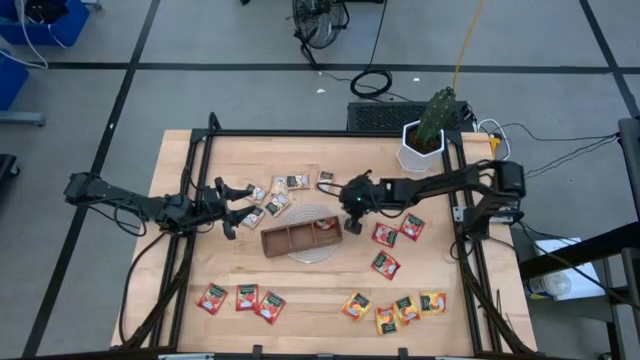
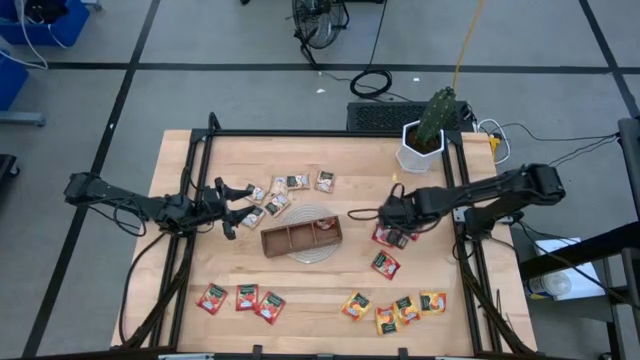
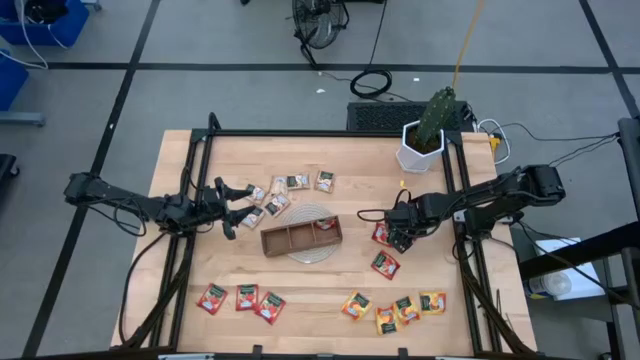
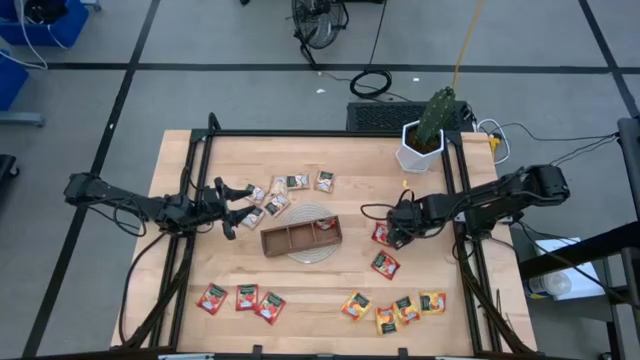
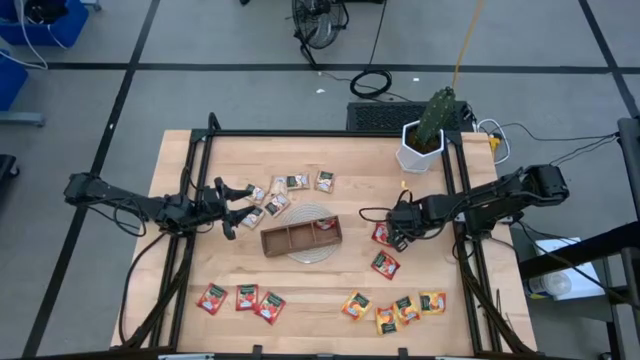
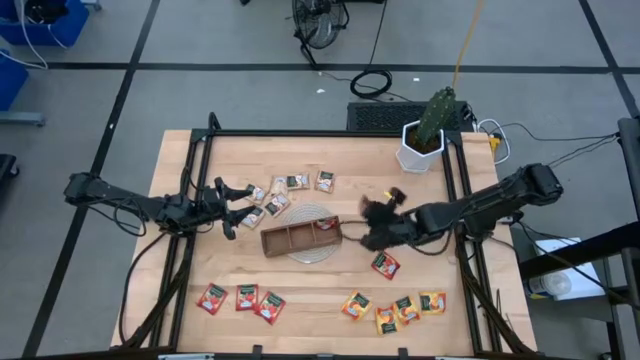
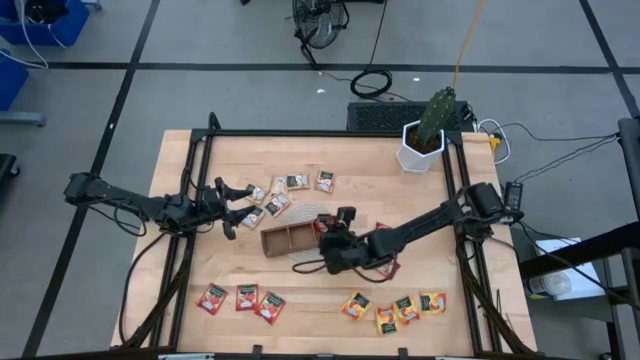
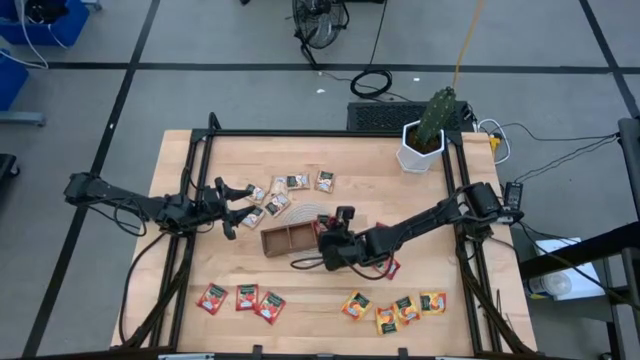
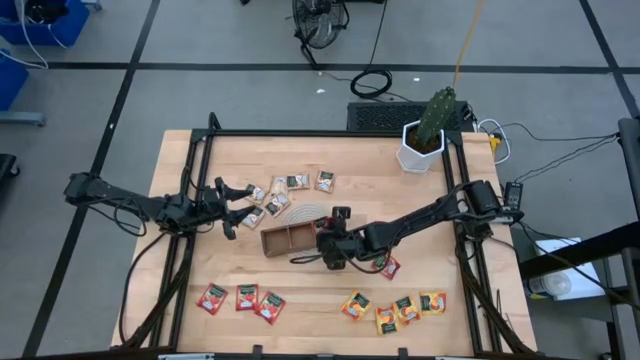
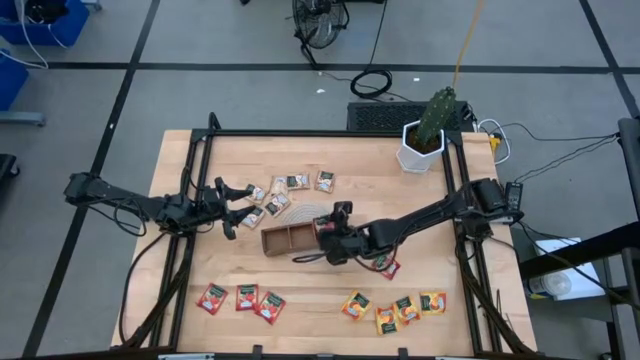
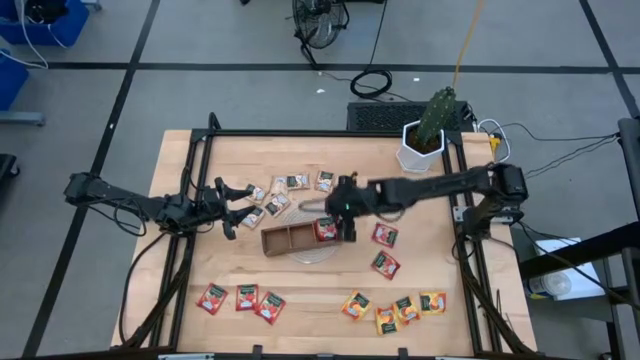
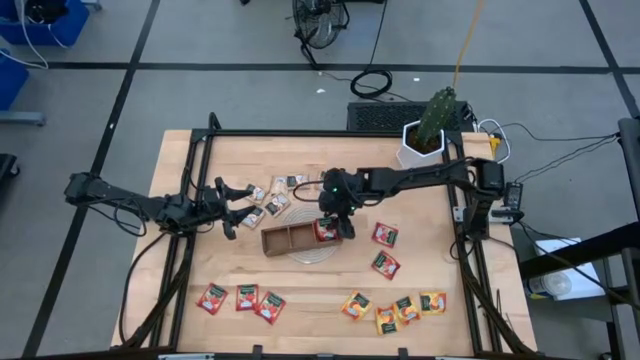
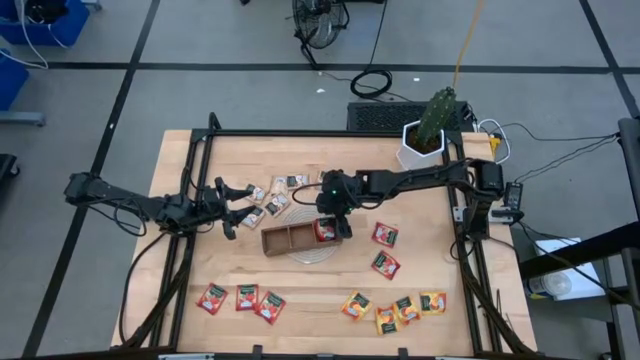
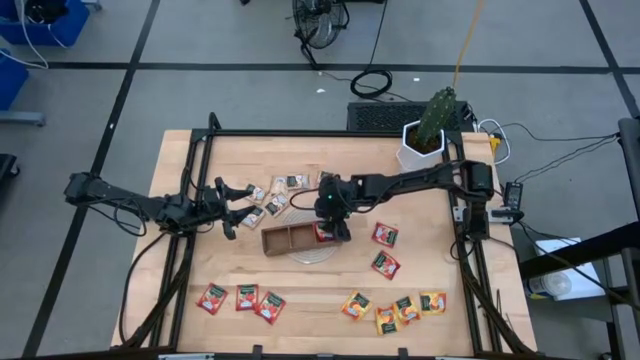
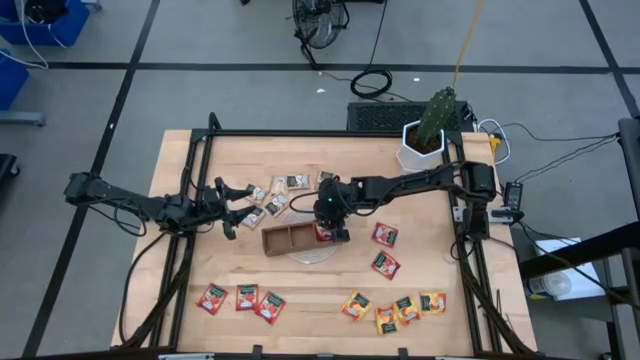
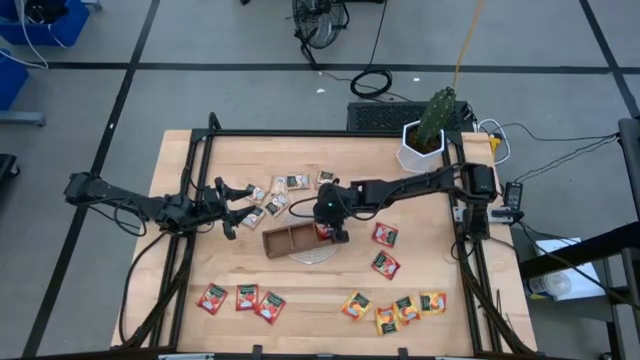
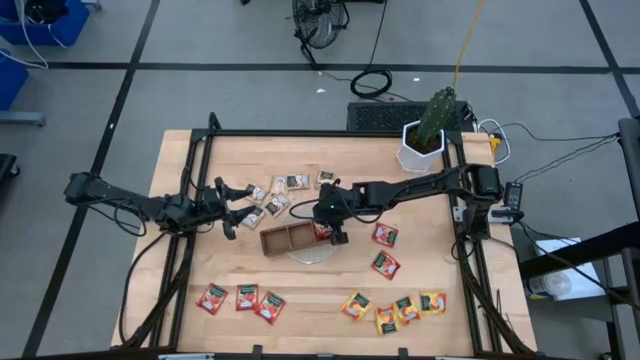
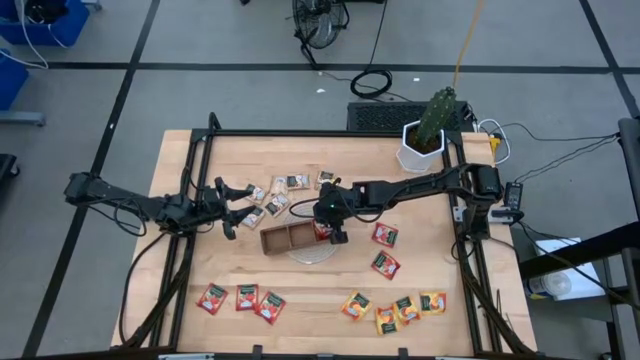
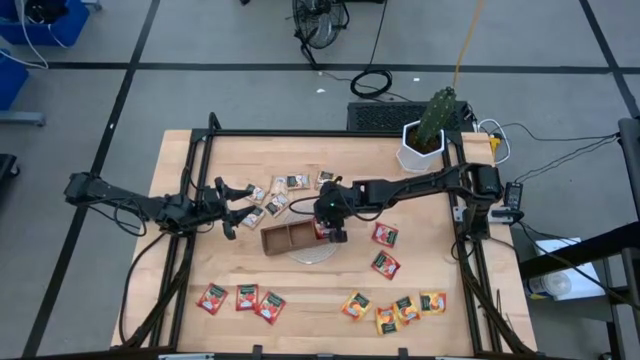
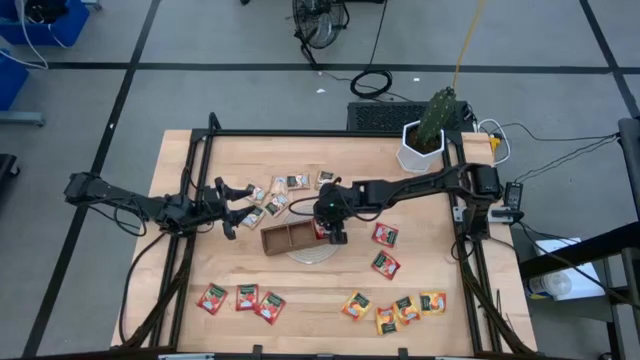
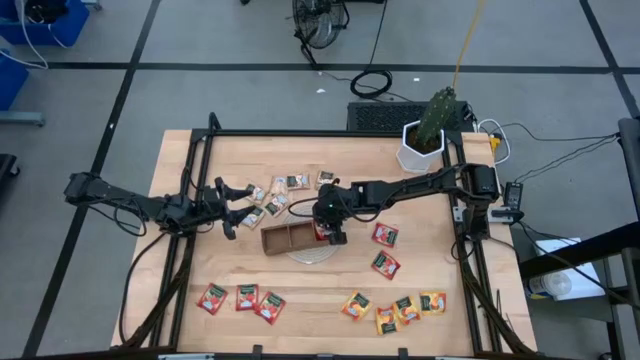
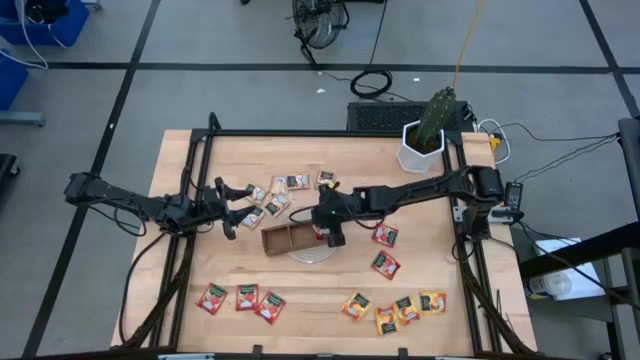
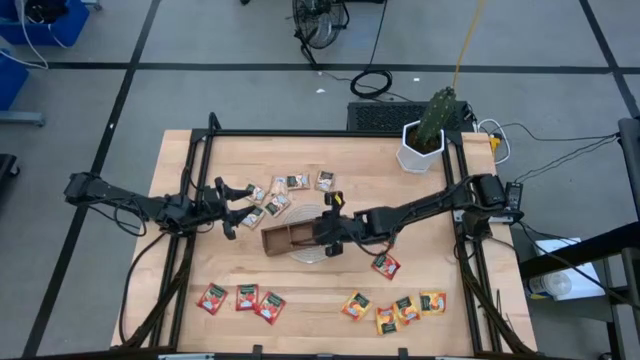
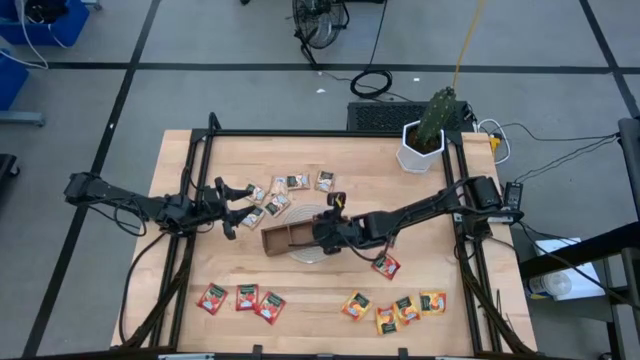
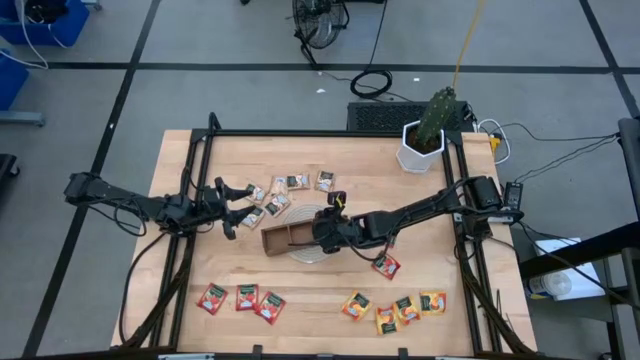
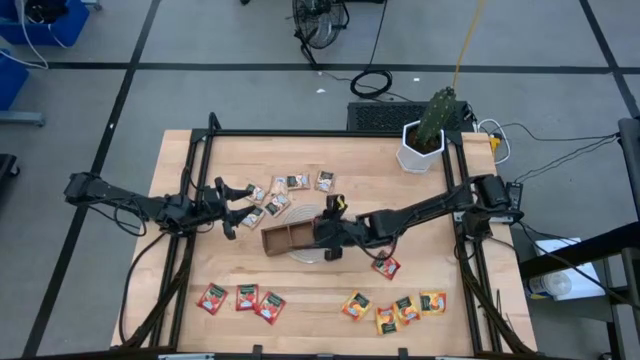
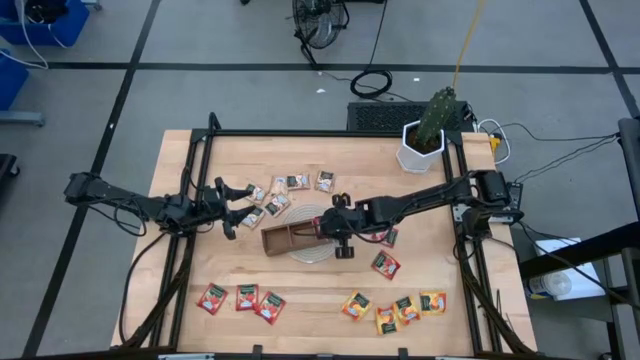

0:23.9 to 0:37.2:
Task: Pick & Place Tea
Put the red tea bag into the right section of the wood organizer

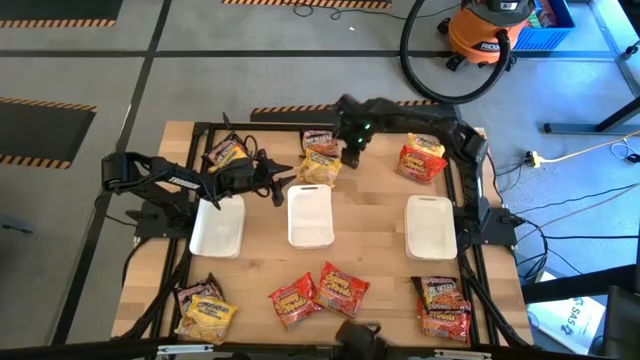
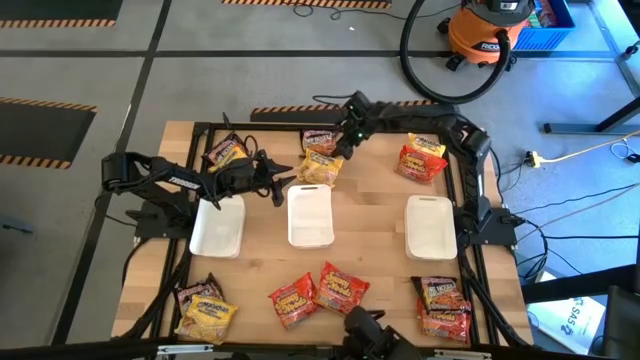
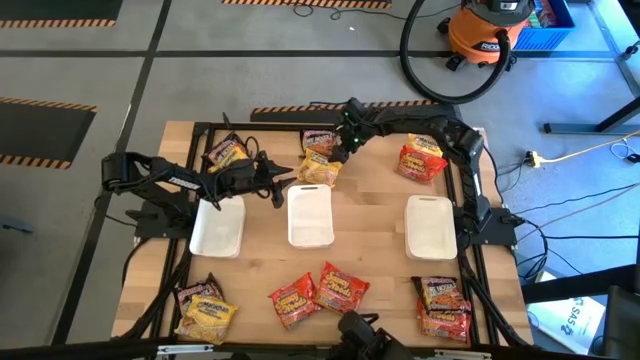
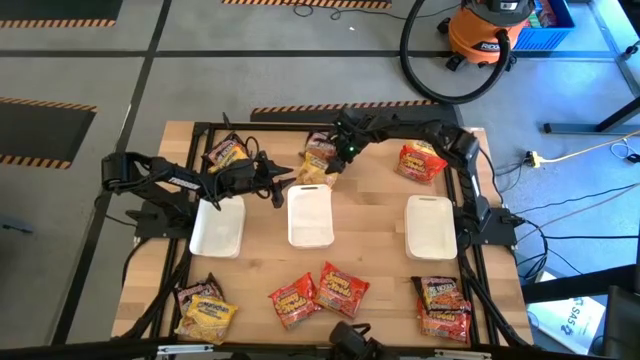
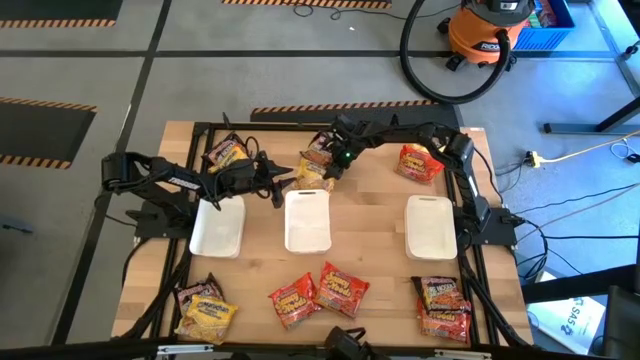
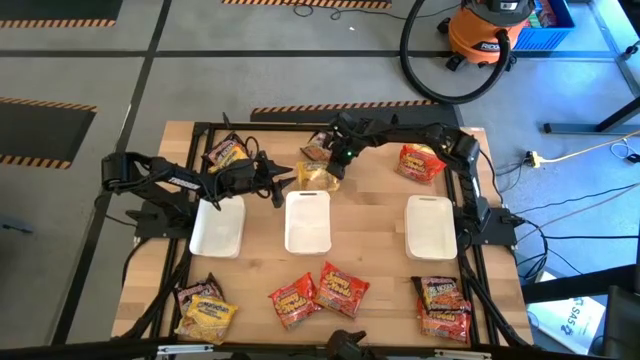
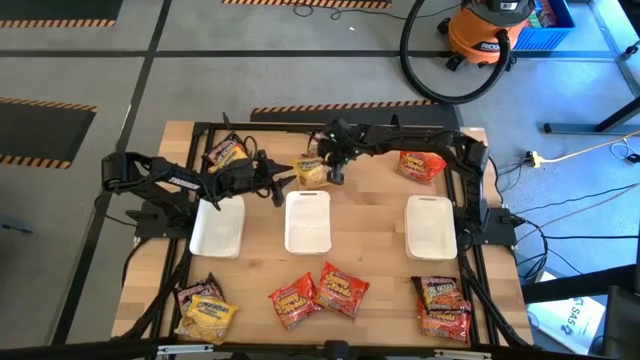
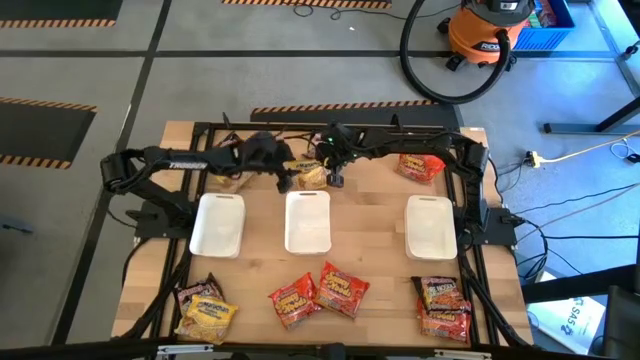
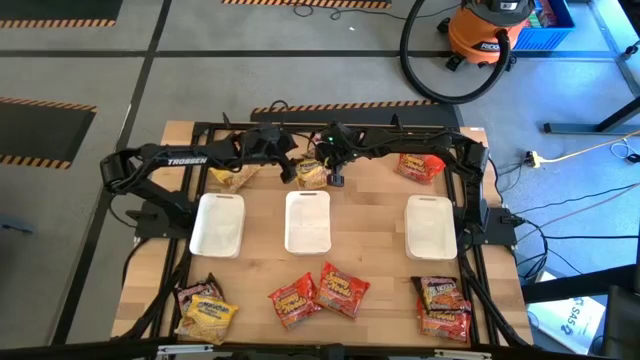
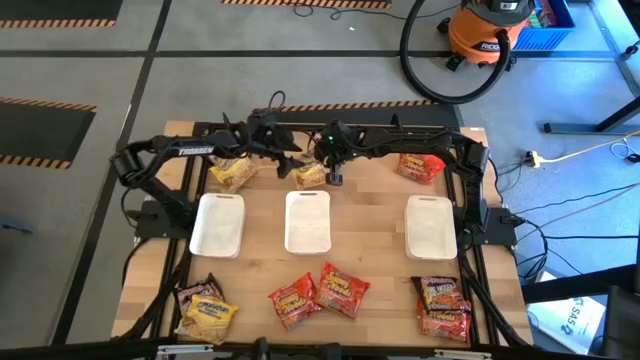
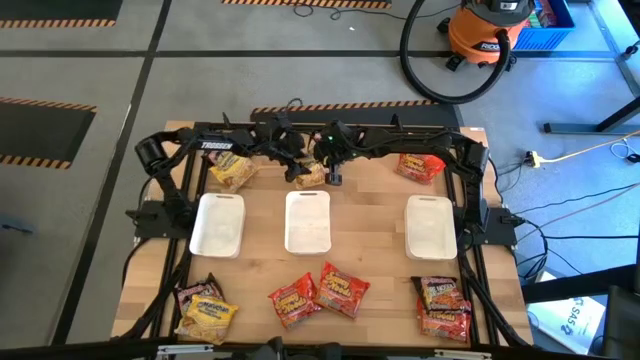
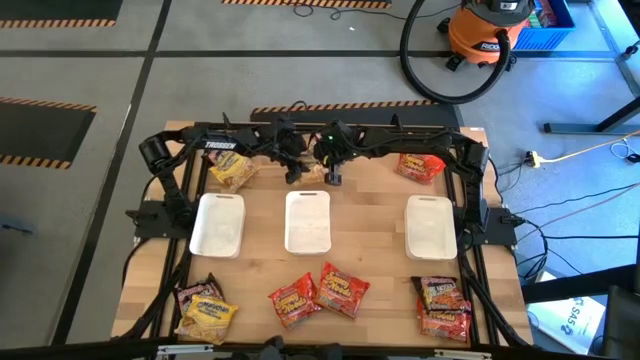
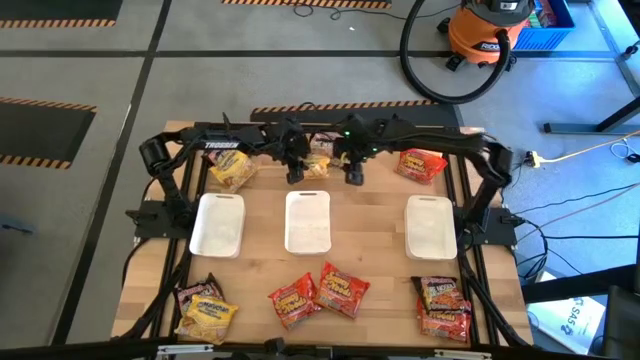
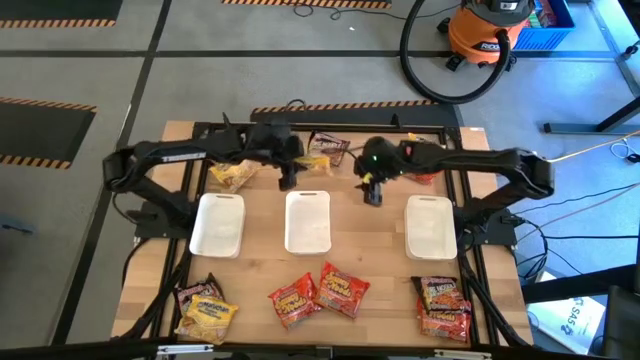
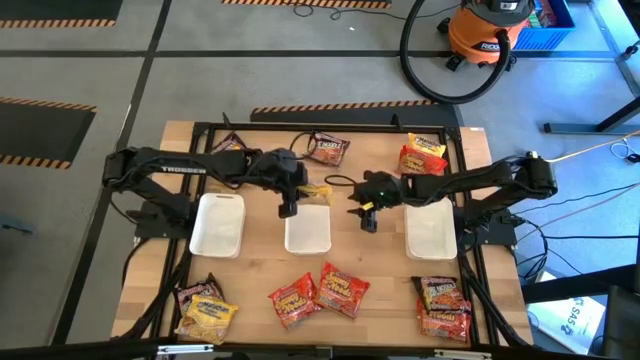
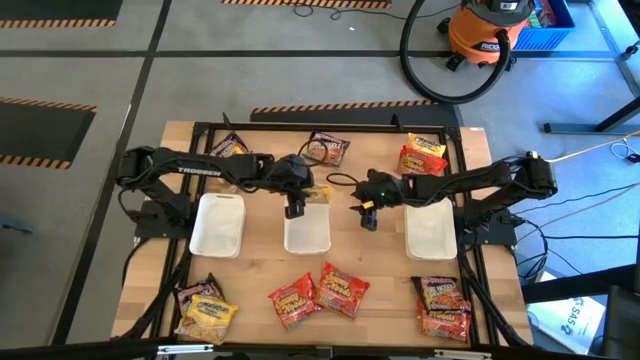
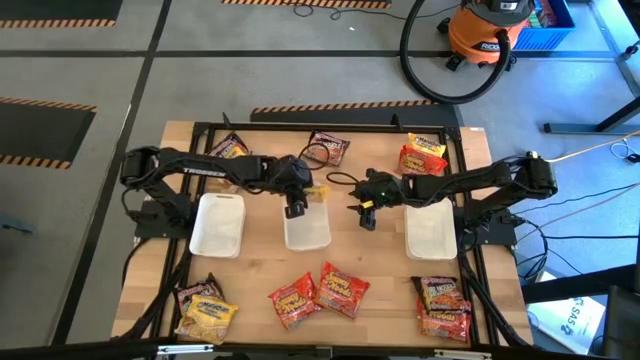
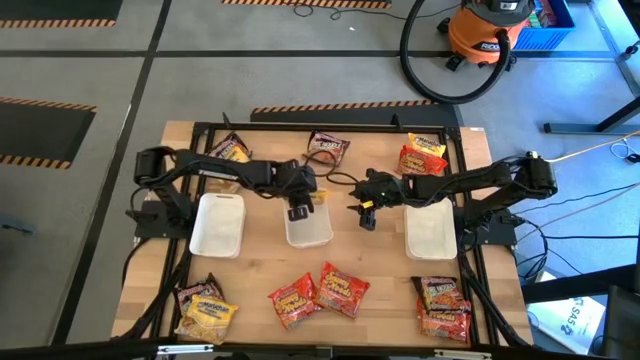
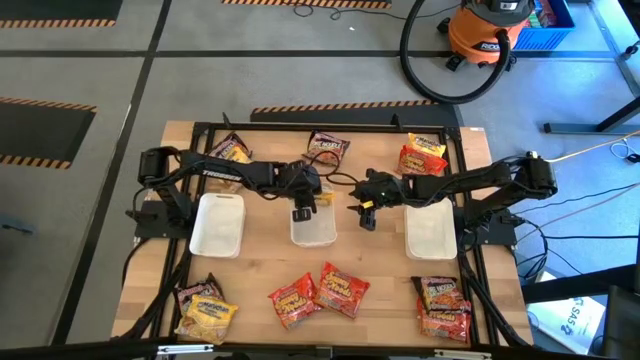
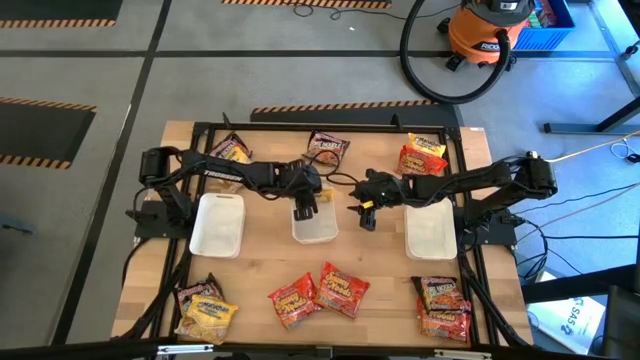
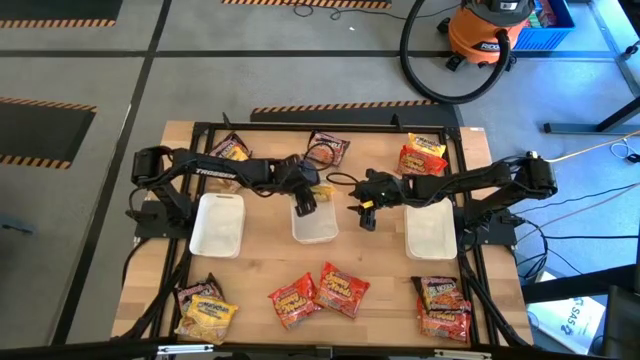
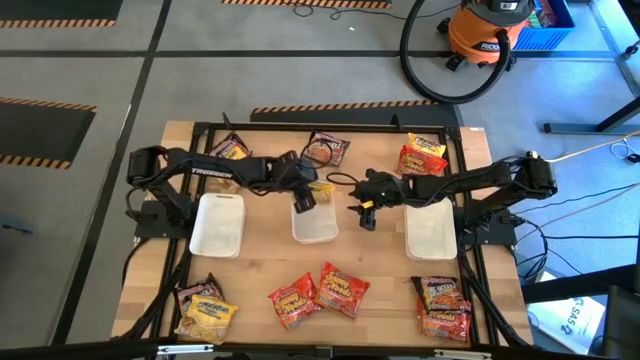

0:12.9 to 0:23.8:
Task: Sort Maruchan noodles
Put the middle top yellow noodle pack into the center white bin
